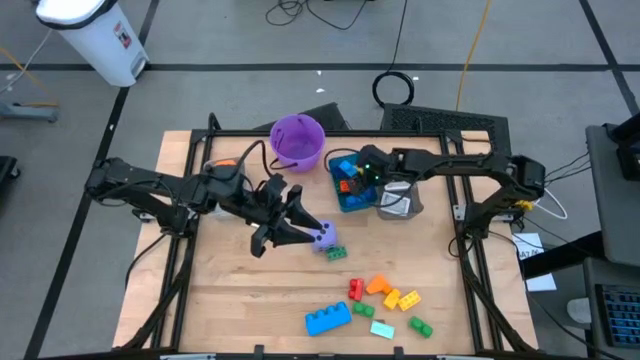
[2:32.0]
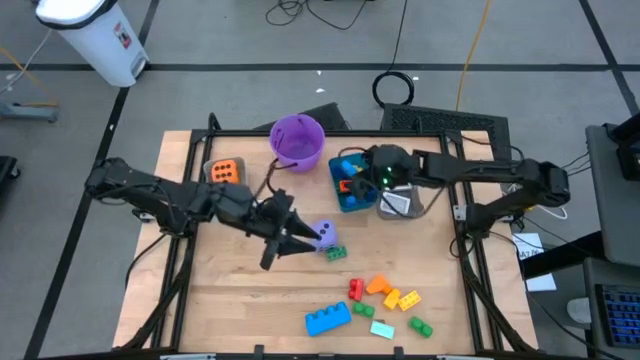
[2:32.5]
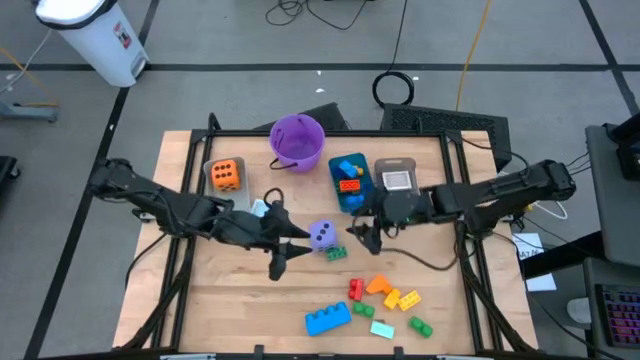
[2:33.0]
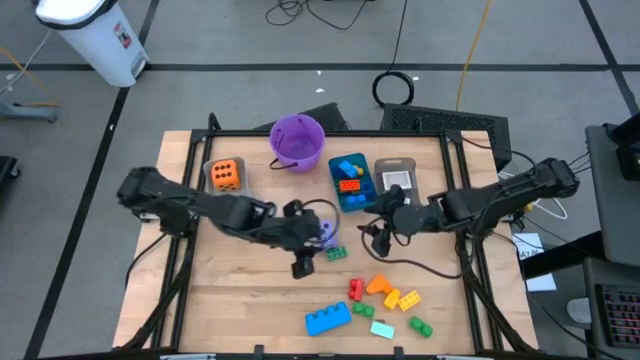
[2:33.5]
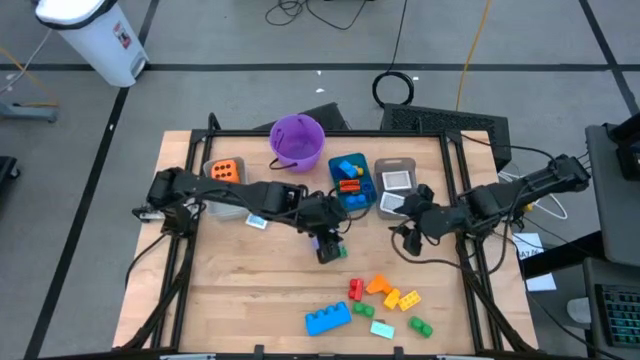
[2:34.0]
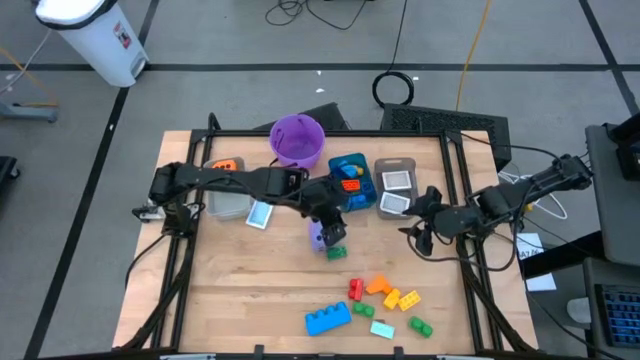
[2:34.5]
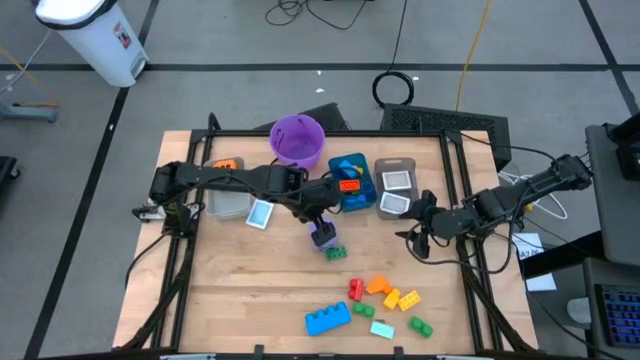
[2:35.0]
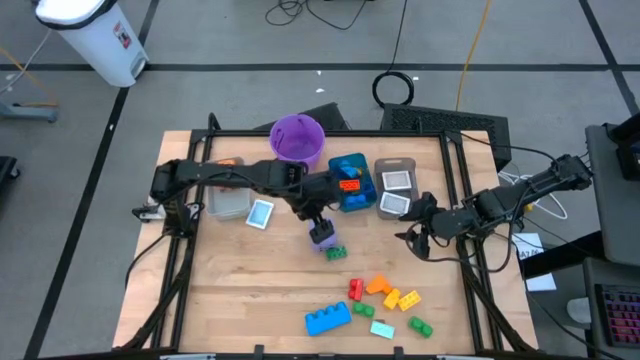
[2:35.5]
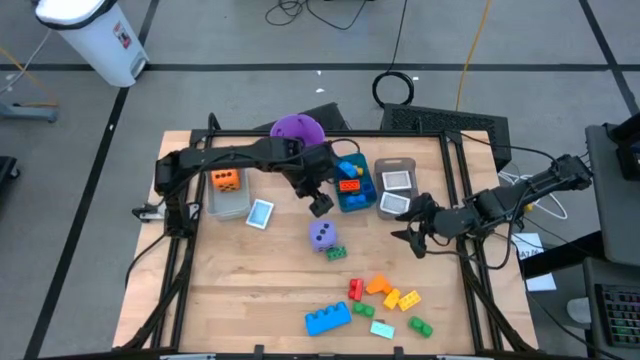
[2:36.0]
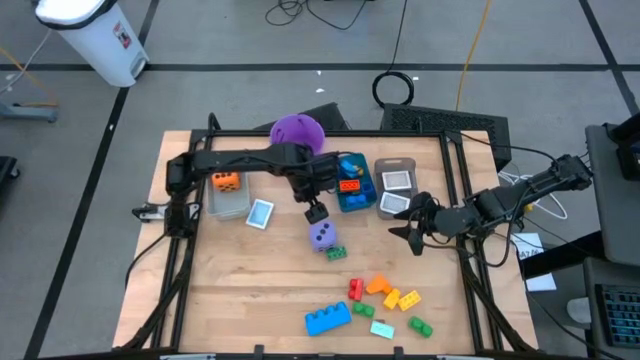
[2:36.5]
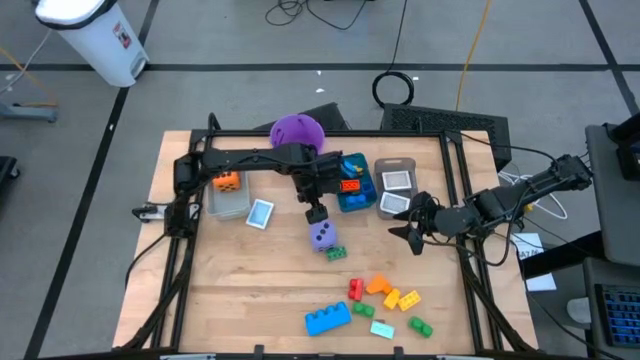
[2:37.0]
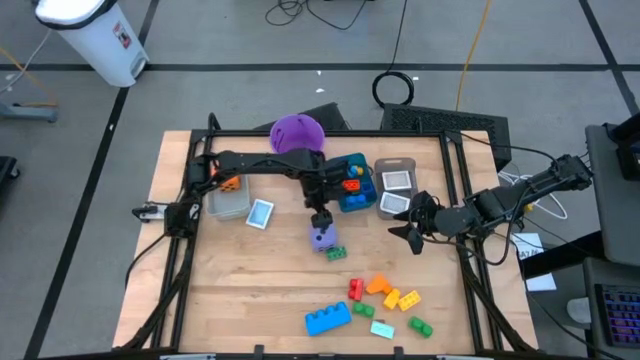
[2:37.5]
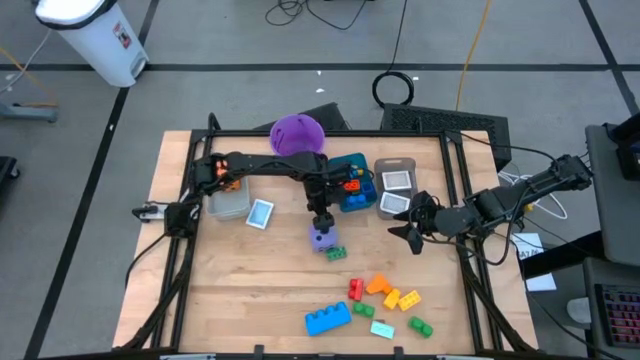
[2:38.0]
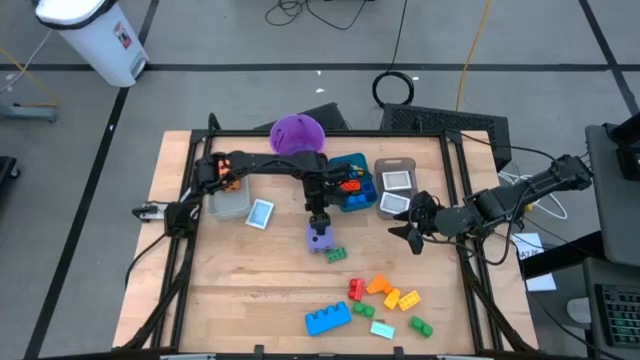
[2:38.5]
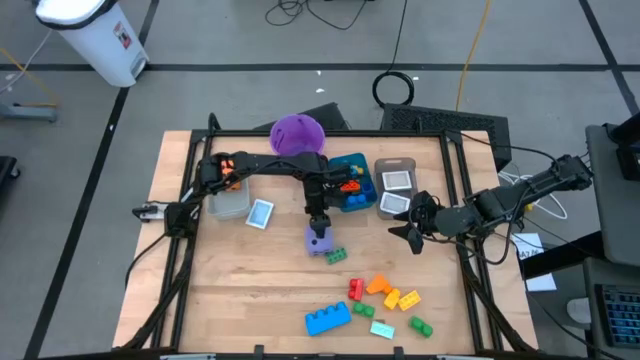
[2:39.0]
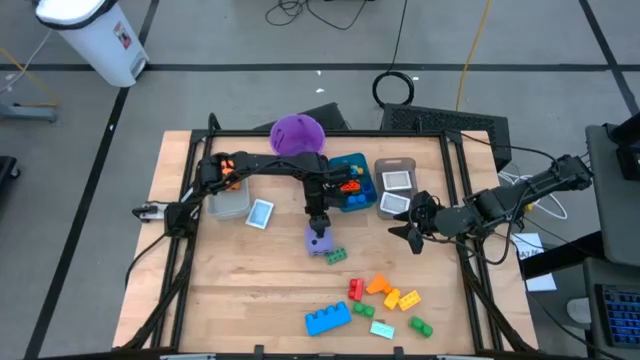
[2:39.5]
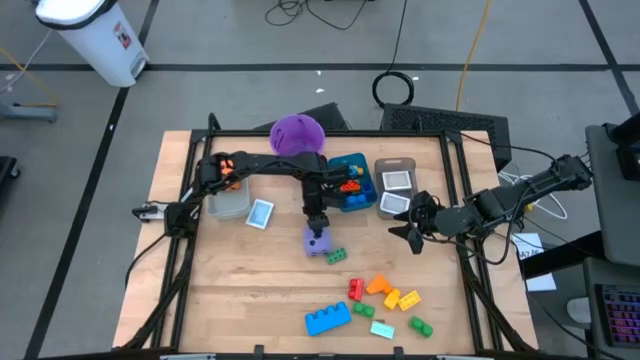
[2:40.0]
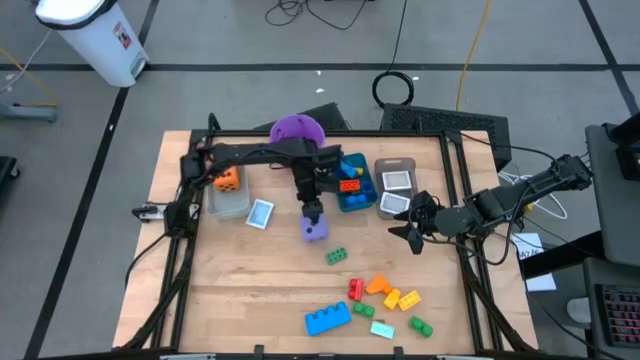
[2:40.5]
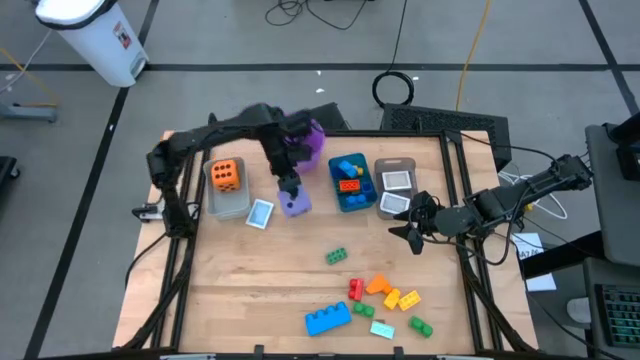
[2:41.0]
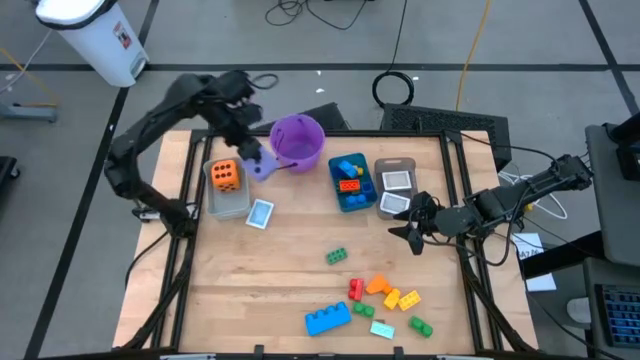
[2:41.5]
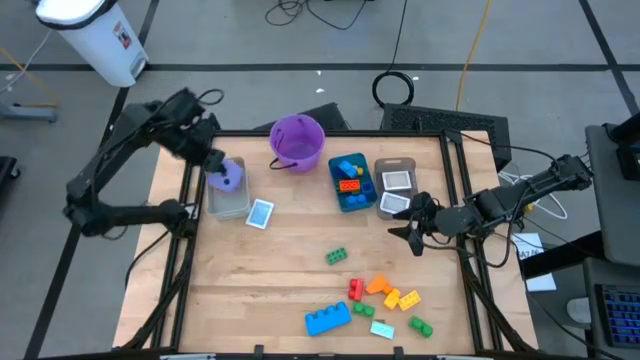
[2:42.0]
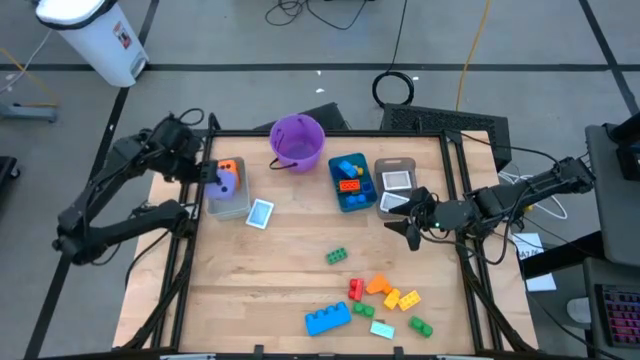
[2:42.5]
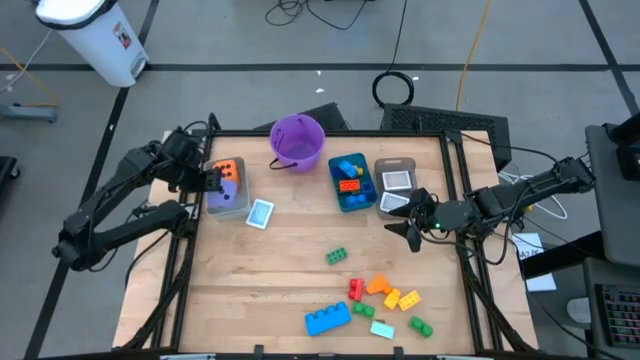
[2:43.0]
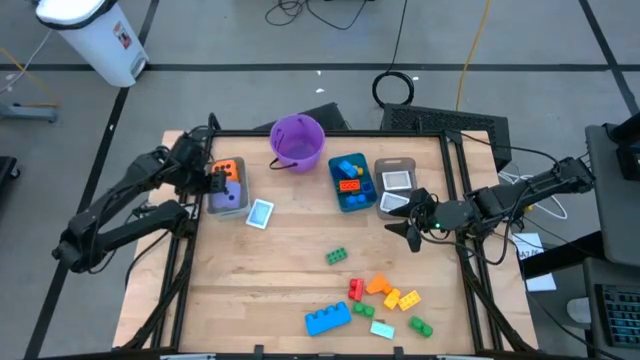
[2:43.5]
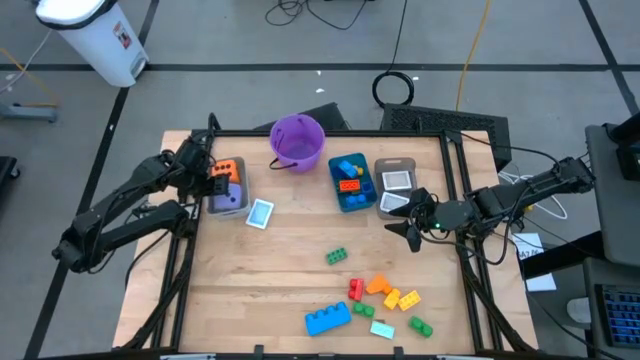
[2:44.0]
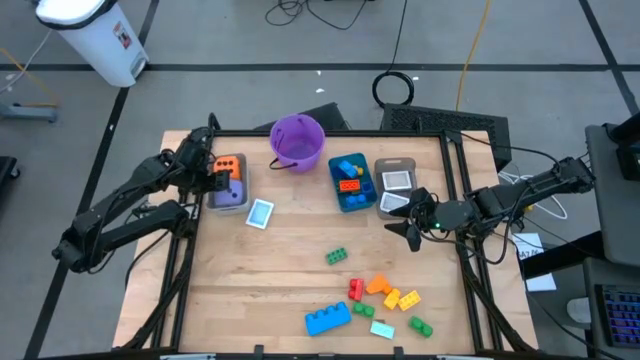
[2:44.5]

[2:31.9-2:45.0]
Task: Pick & Place Toys
Put the purple die into the gray bin

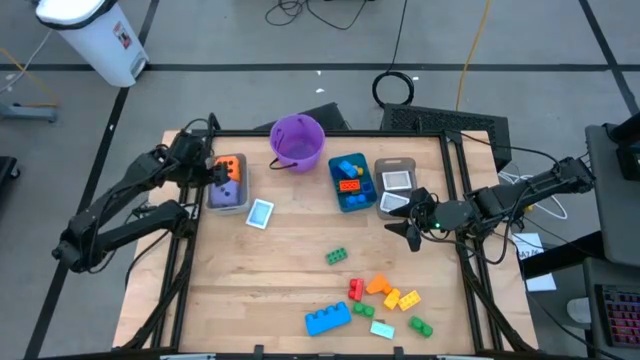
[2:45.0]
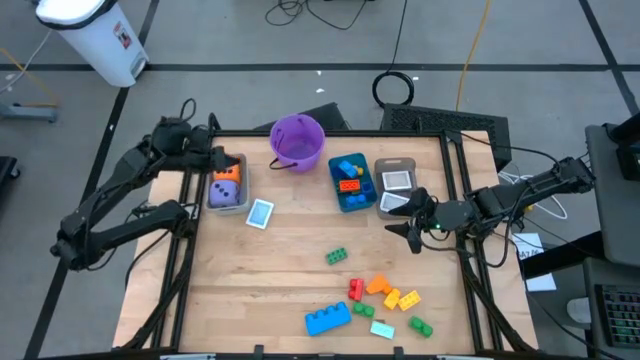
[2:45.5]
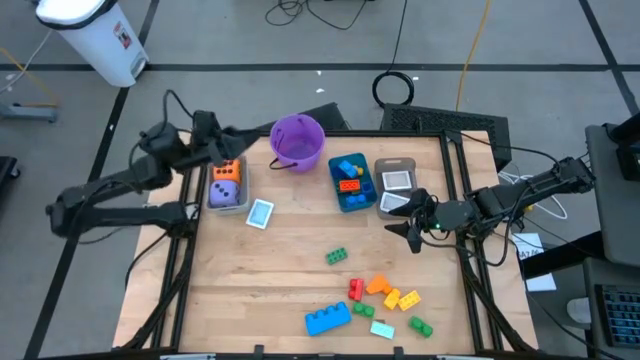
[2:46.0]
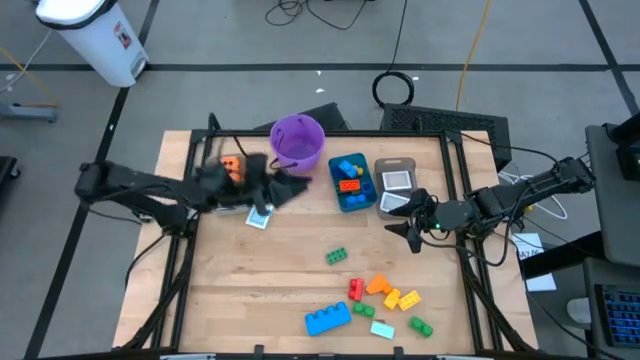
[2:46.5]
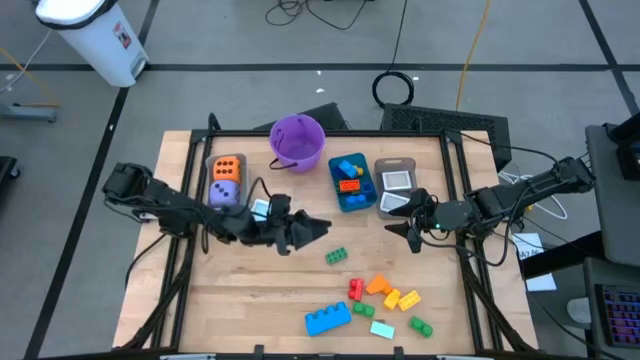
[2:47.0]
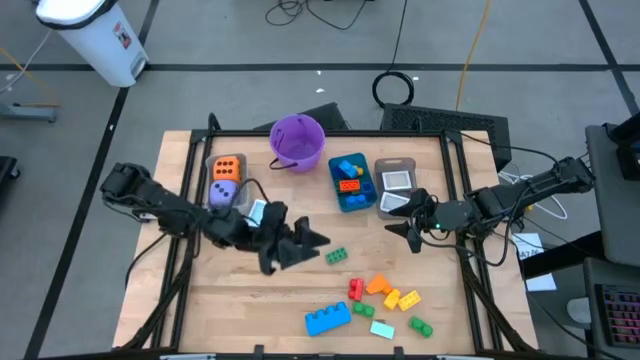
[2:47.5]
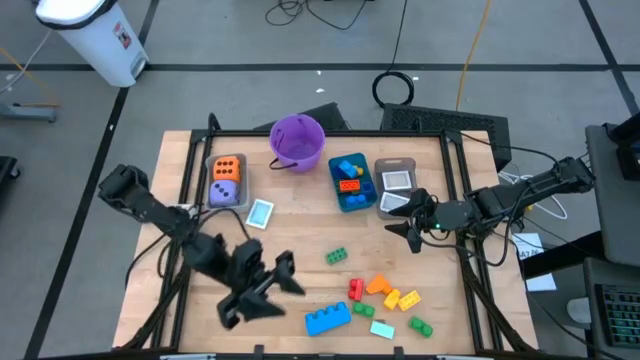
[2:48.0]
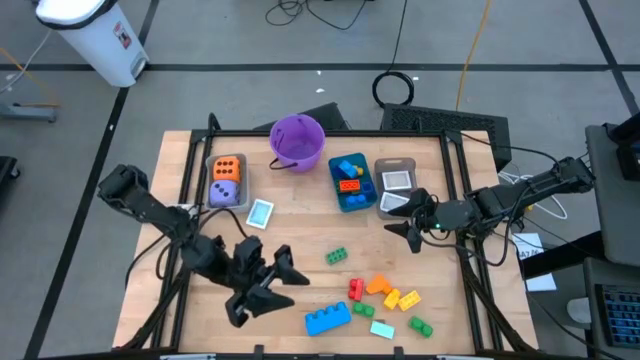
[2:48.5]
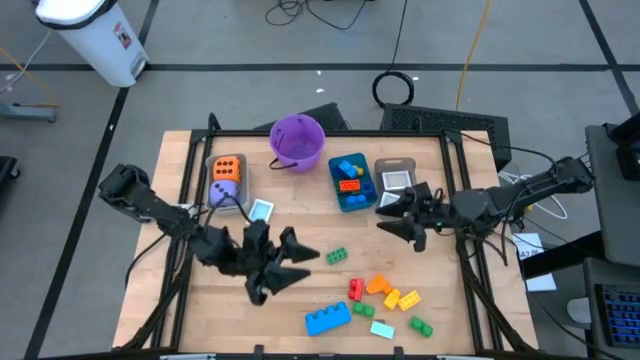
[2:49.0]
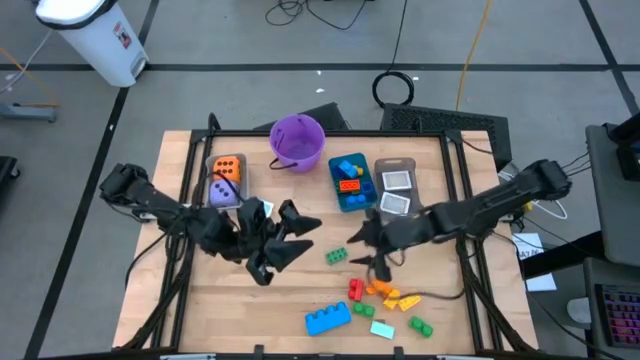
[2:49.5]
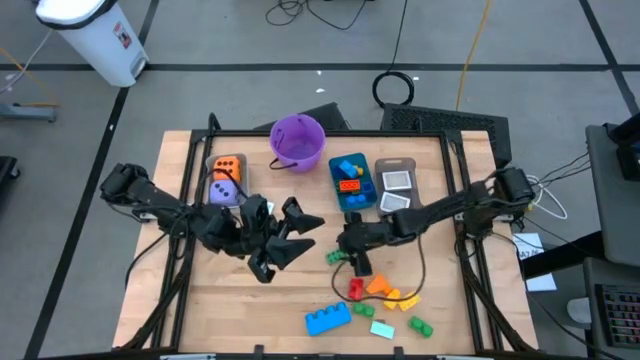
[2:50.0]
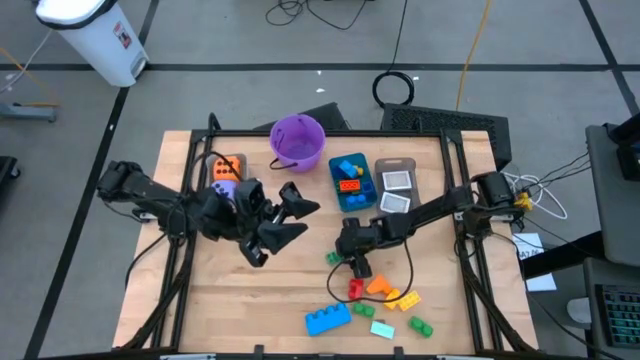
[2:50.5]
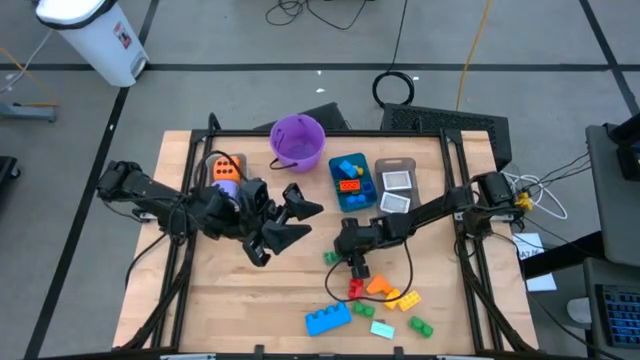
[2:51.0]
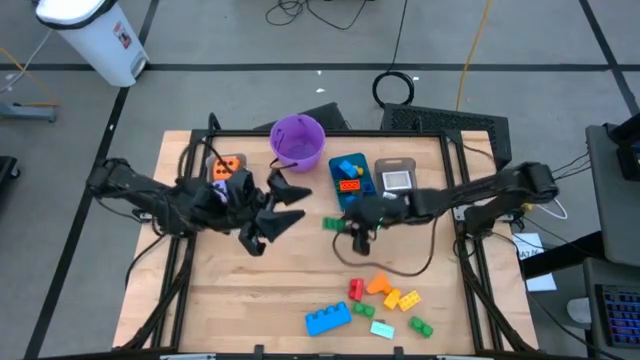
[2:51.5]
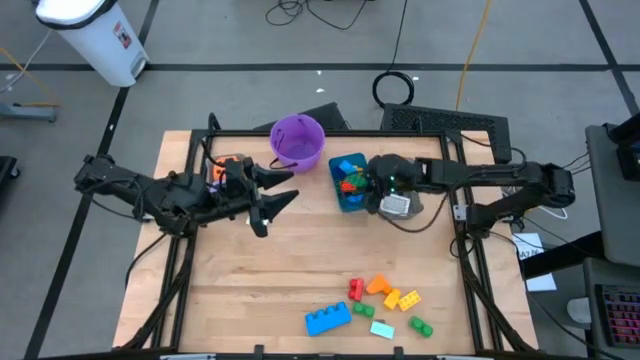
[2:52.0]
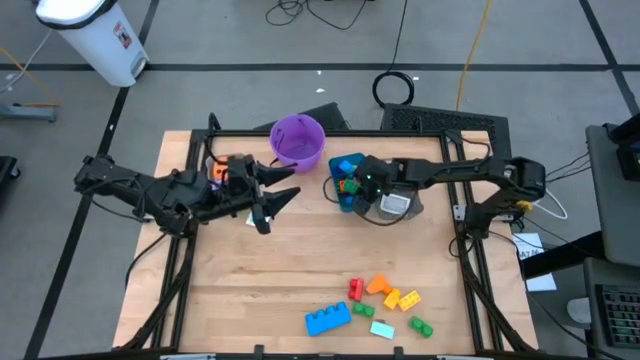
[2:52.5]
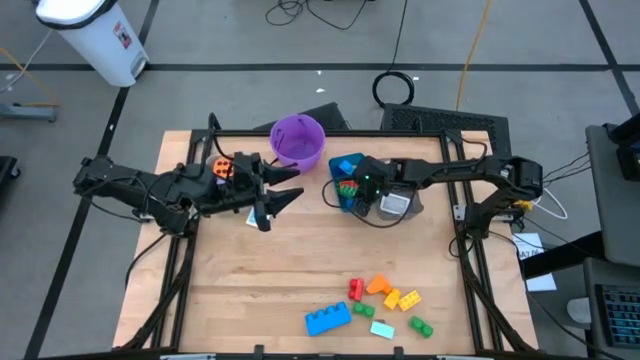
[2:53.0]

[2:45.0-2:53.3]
Put the green game piece into the blue bin
